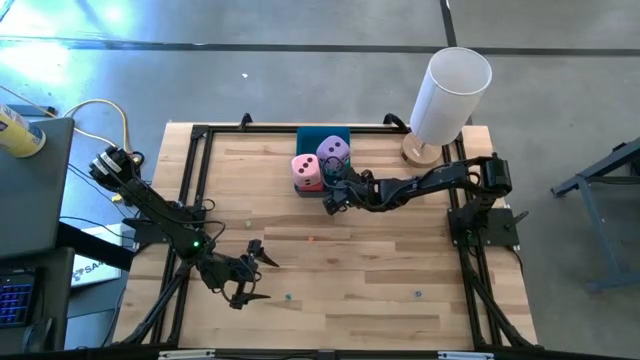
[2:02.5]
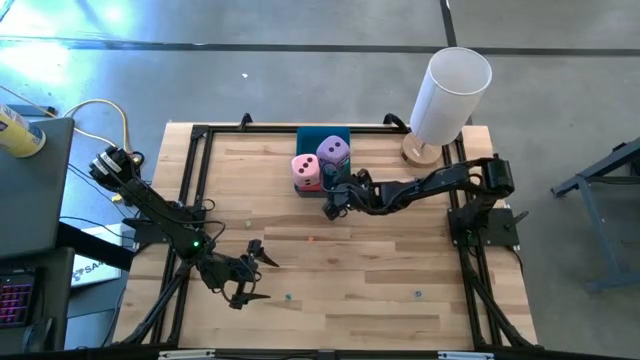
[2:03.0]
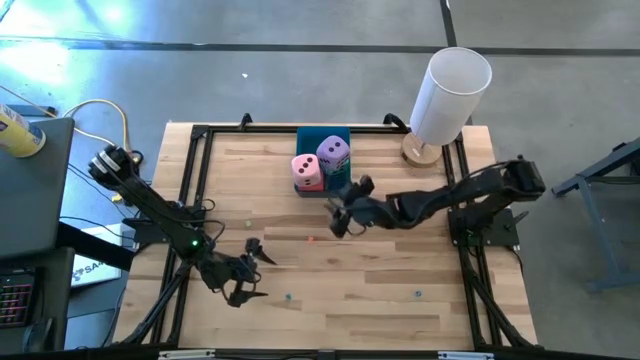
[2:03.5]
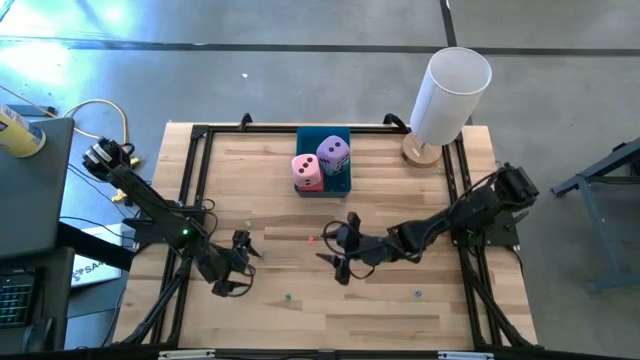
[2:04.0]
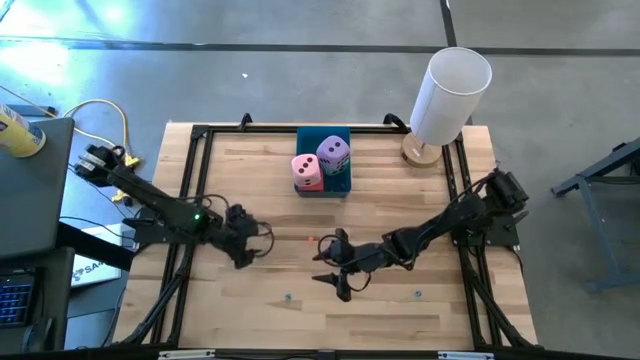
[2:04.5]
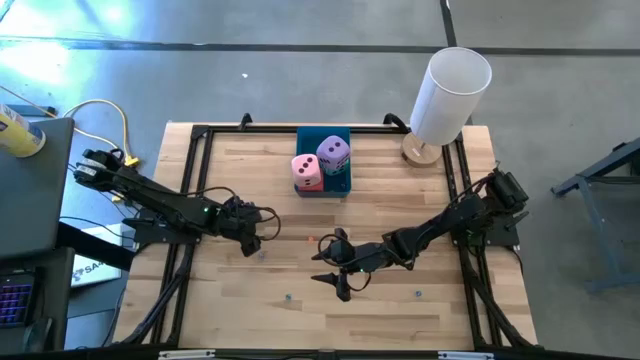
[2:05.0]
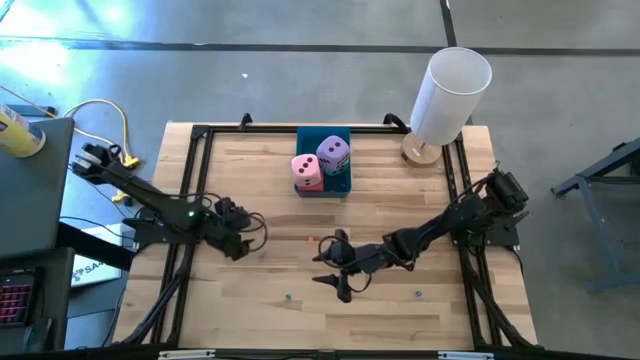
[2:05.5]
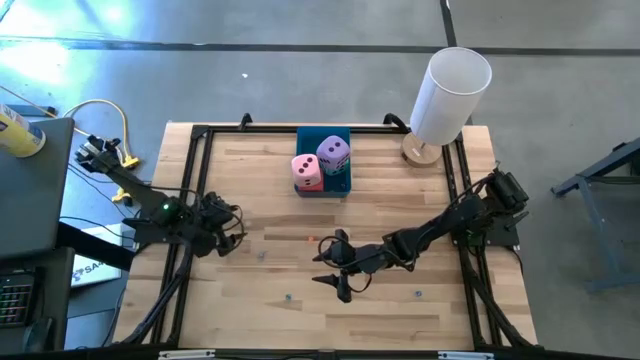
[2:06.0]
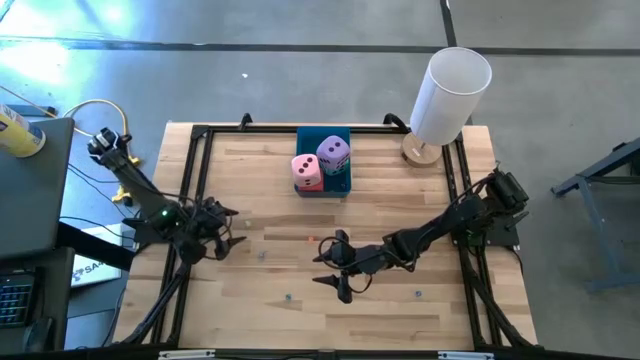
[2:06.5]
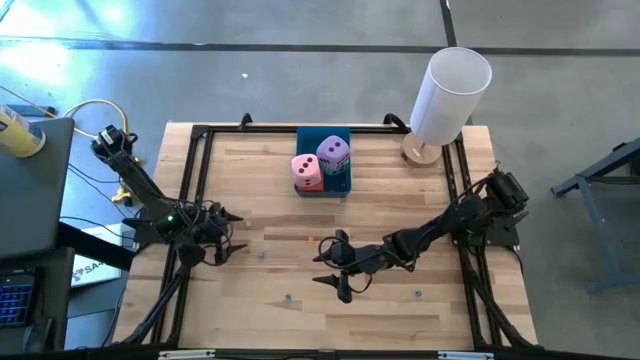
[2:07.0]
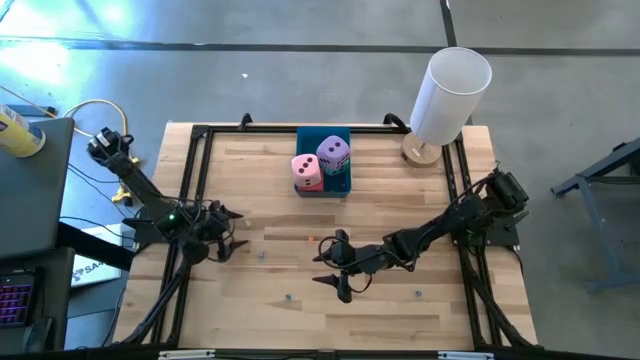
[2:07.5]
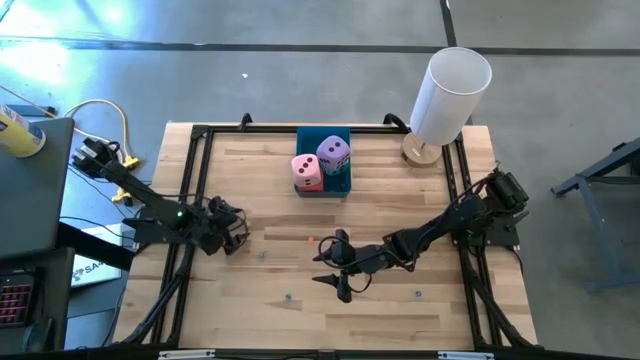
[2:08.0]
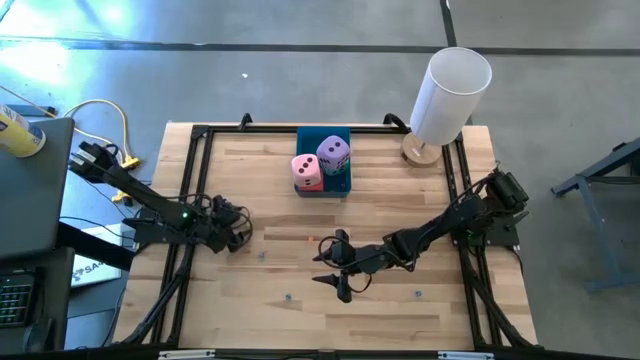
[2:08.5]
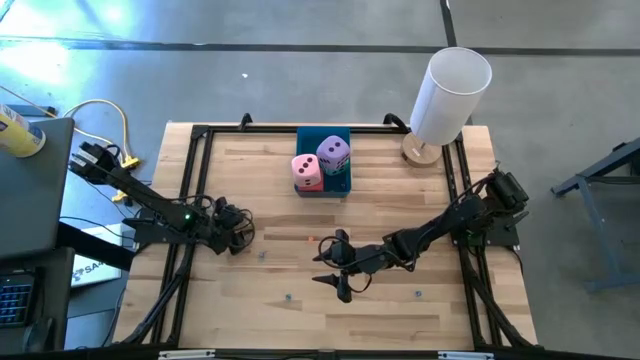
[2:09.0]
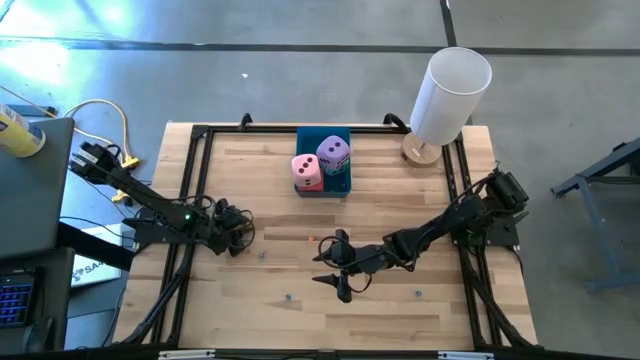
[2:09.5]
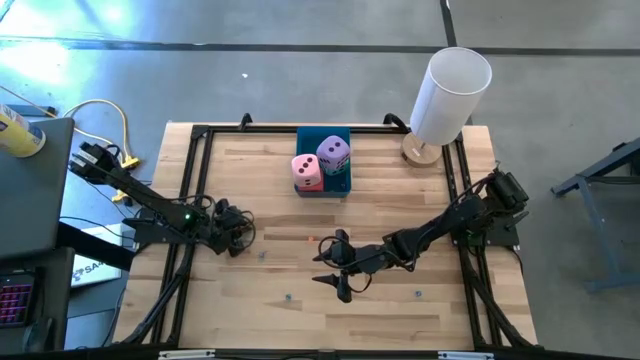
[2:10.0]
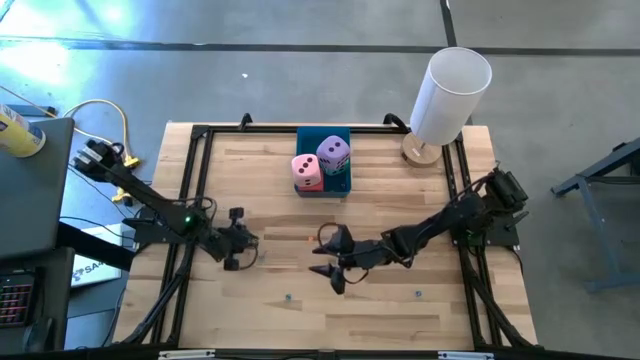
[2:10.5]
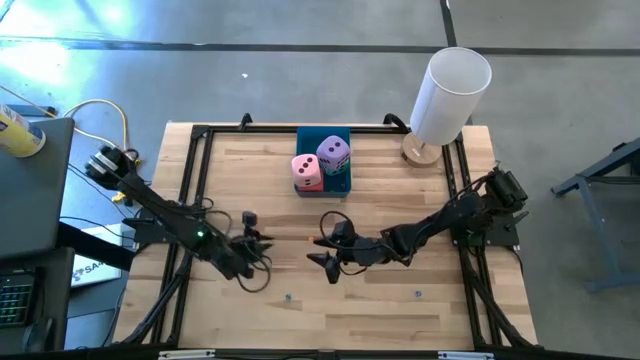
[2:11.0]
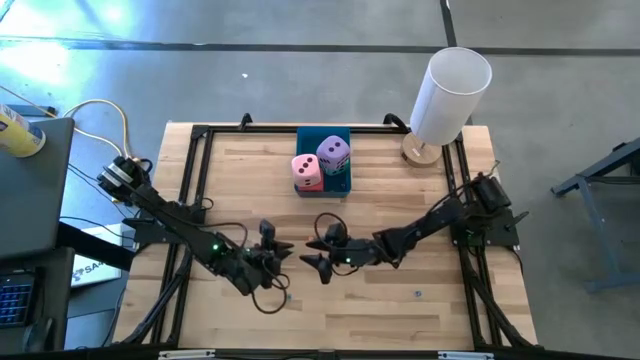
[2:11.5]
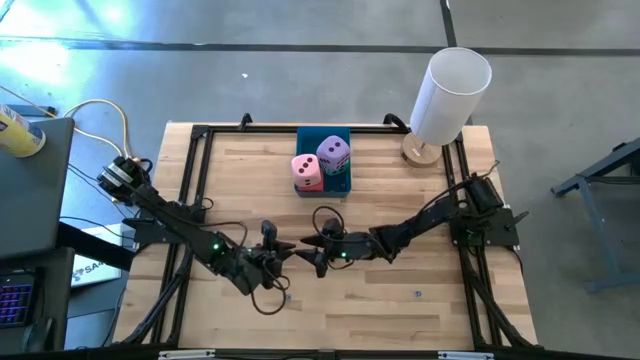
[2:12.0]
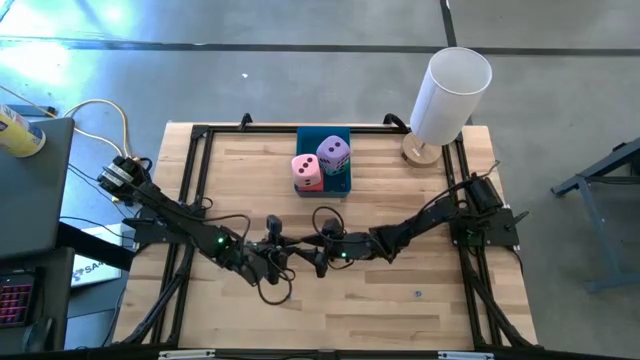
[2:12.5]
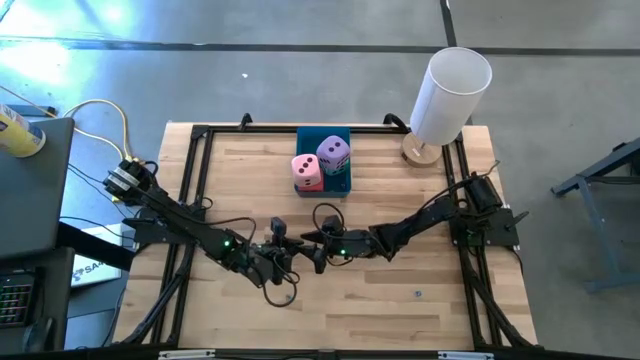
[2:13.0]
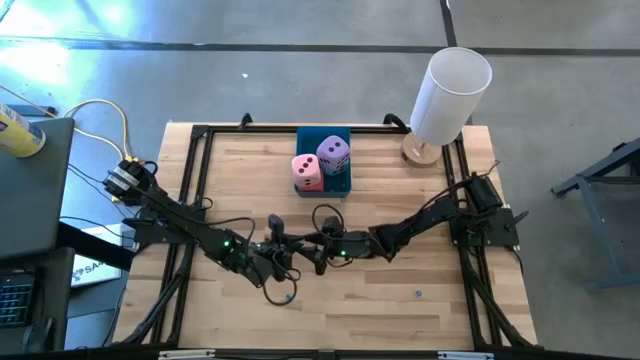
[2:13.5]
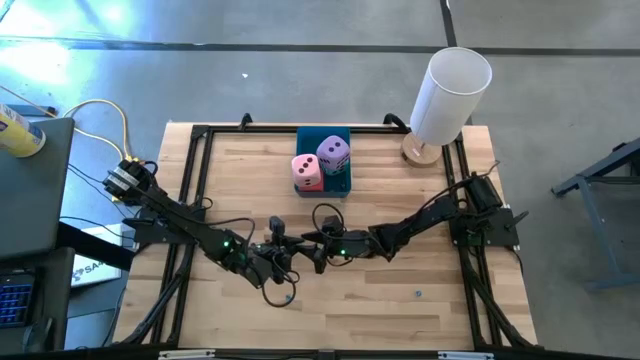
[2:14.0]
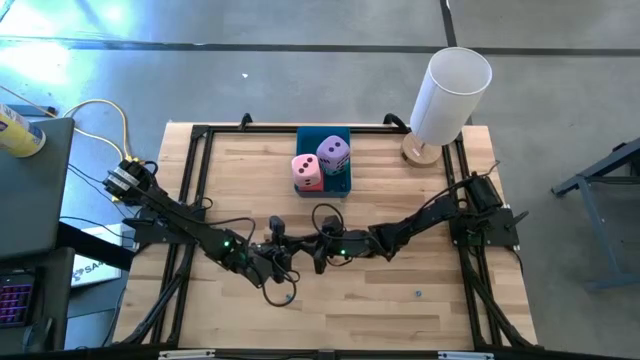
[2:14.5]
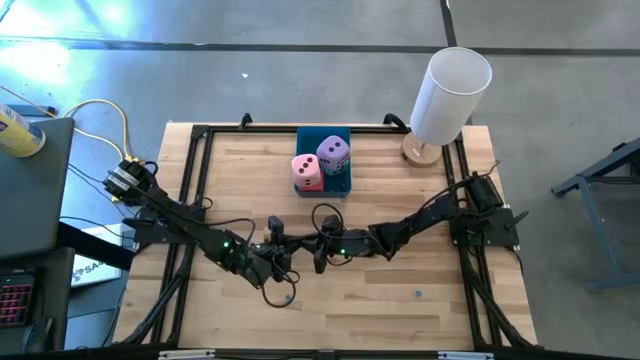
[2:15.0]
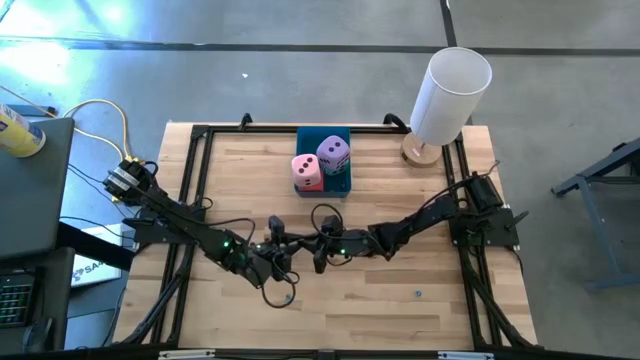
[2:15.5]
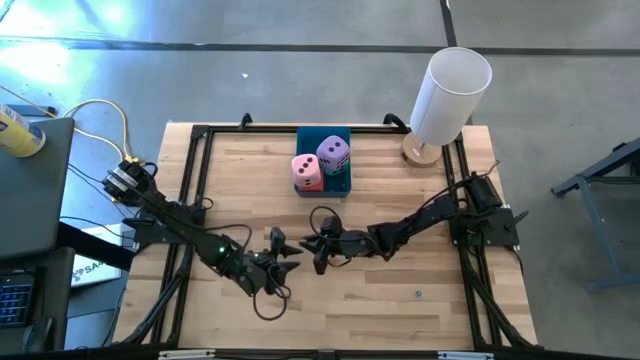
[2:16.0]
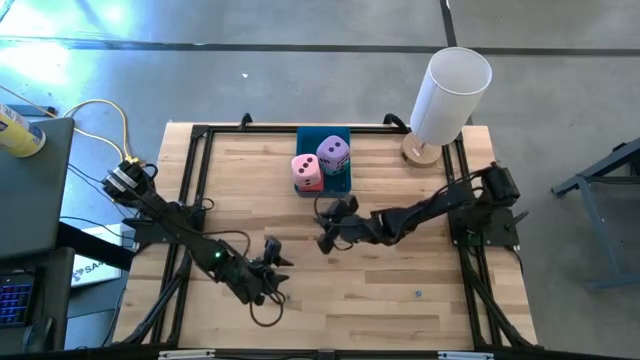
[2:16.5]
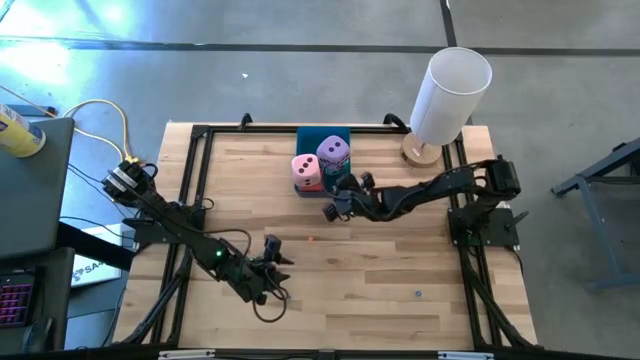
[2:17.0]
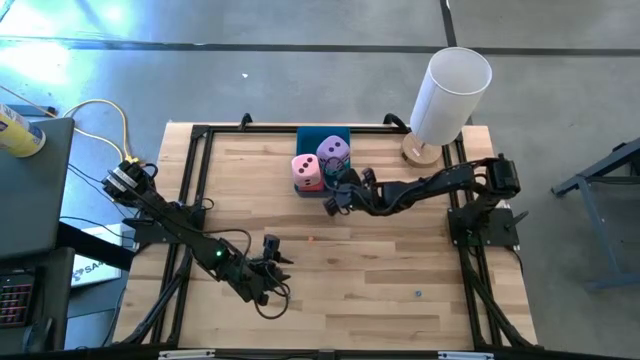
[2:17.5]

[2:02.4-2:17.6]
Task: Pick & Place Dice
Put the green die into the blue bin

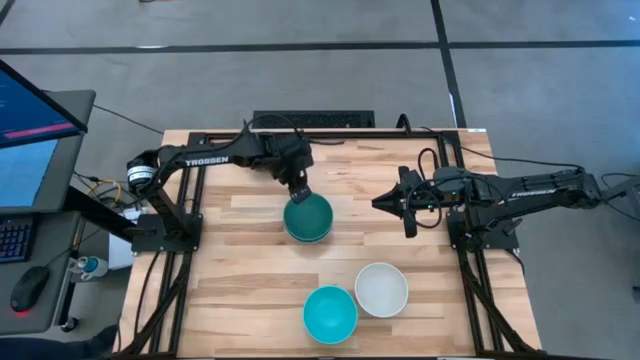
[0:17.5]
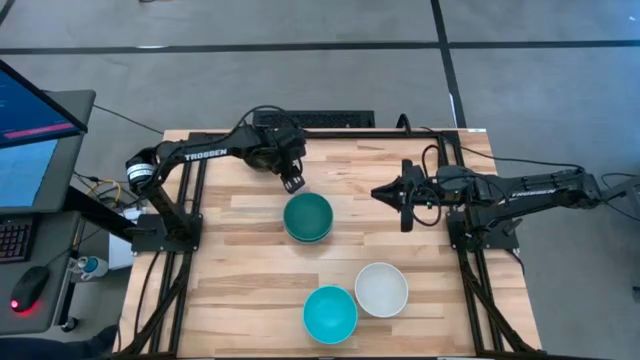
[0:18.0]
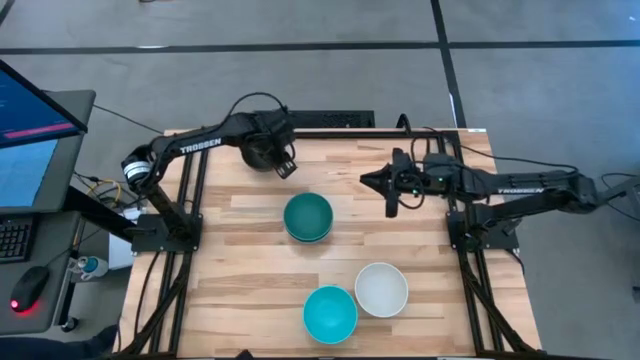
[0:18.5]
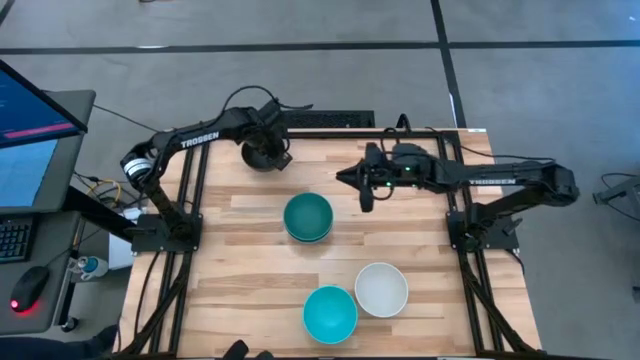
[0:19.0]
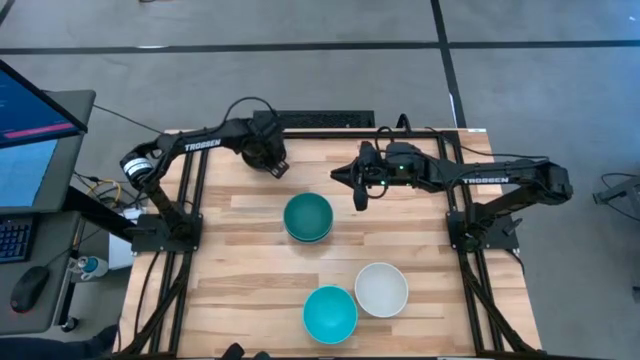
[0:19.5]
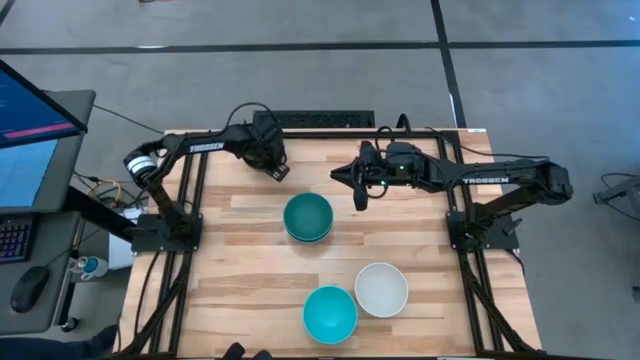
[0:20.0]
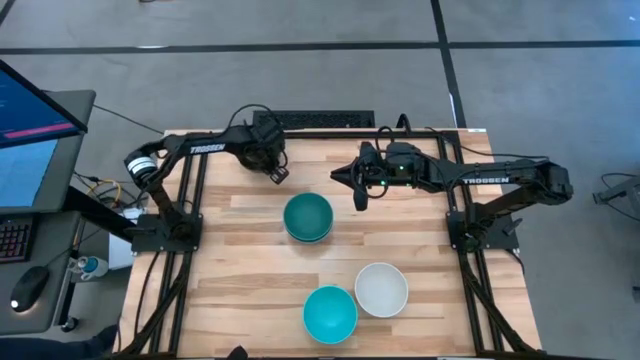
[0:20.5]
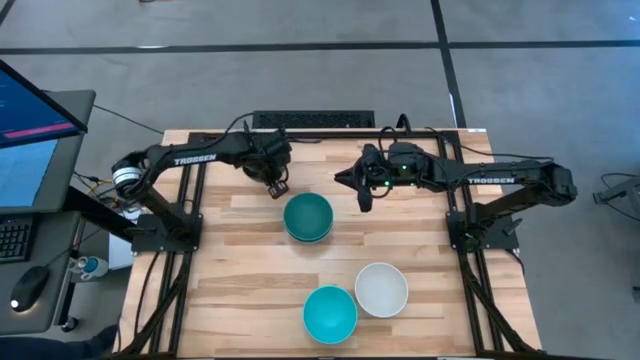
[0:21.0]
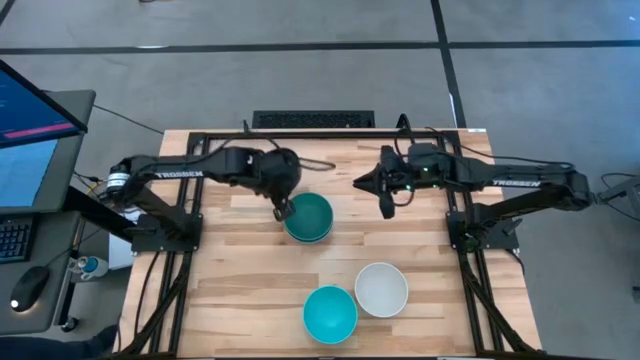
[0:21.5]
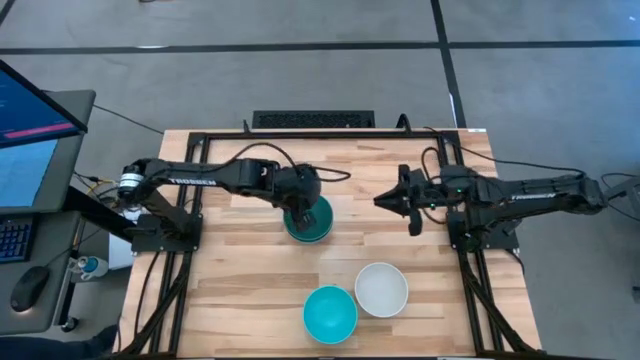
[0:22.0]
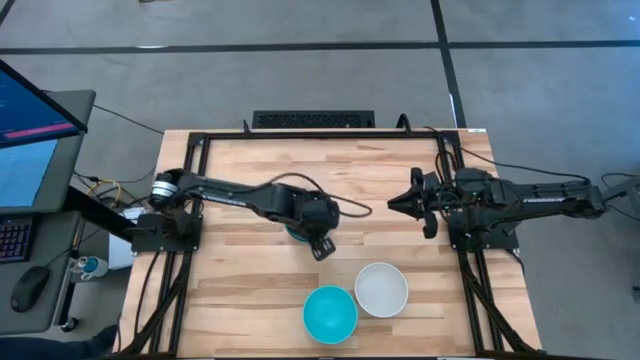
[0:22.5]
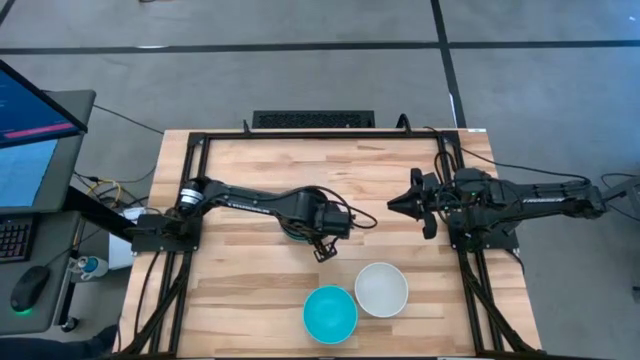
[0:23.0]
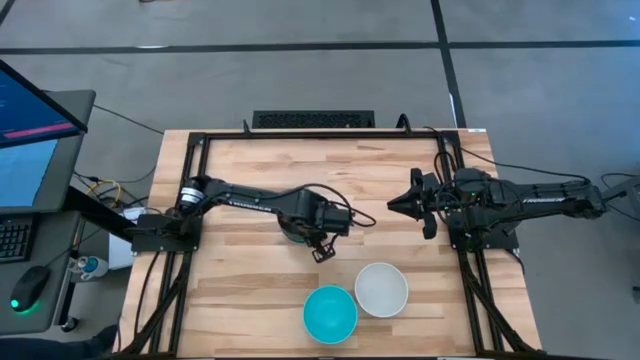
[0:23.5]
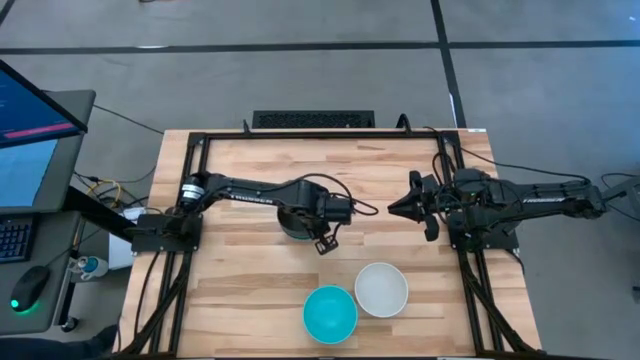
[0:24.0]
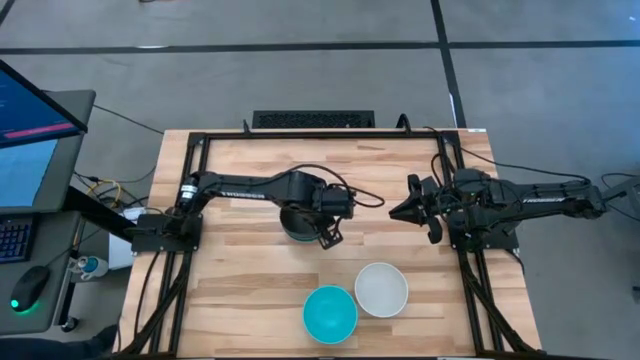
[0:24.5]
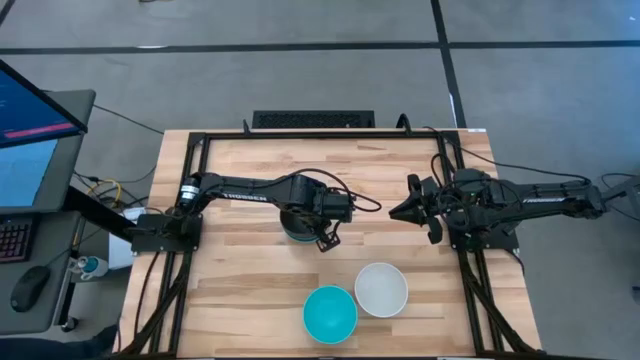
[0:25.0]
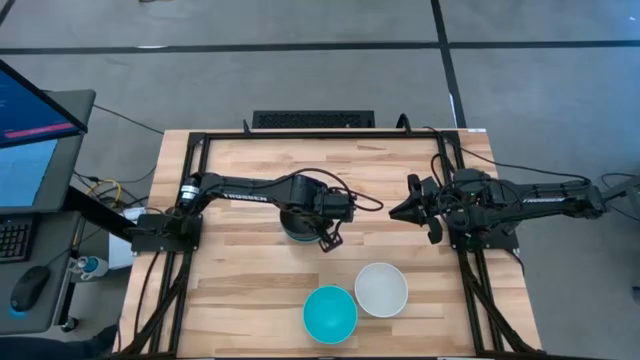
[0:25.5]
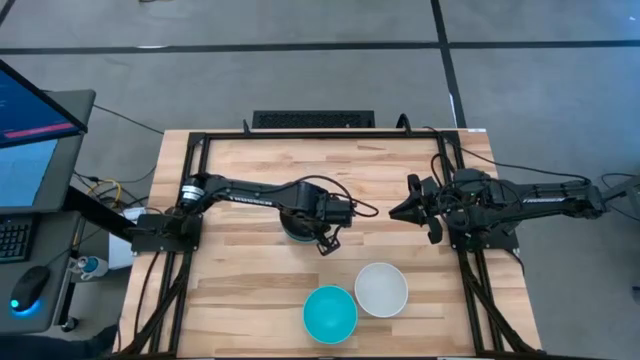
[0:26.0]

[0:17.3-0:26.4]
Task: Nest bowls inside each other
Stack the black bowl on the green bowl
